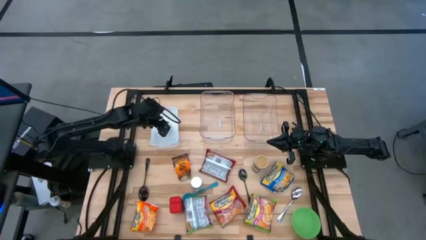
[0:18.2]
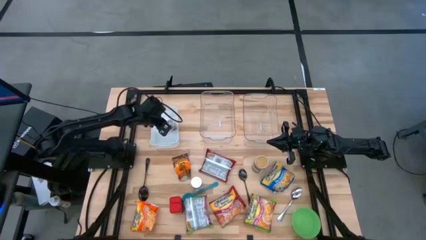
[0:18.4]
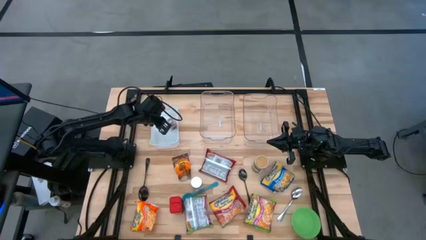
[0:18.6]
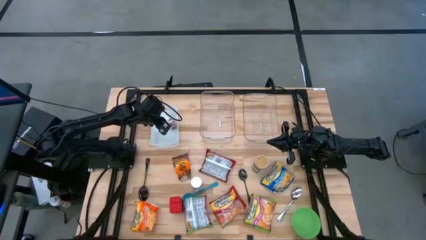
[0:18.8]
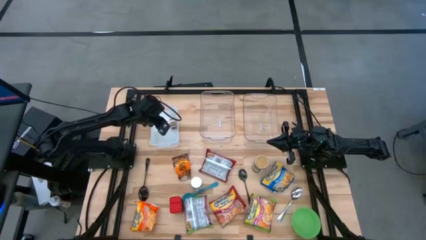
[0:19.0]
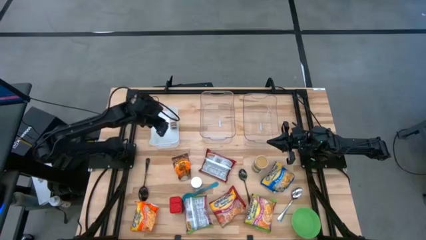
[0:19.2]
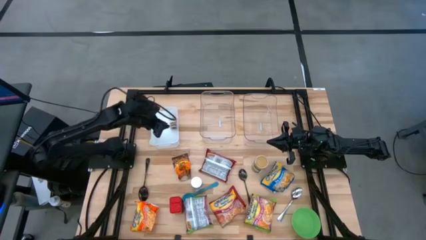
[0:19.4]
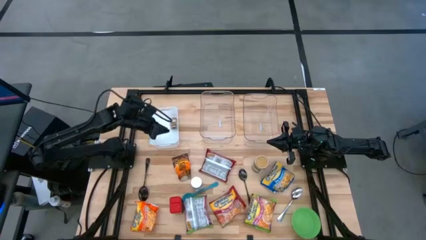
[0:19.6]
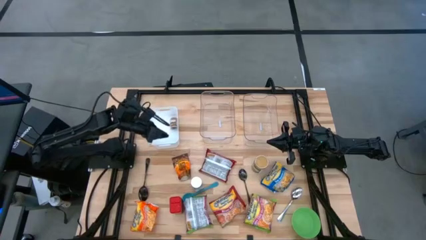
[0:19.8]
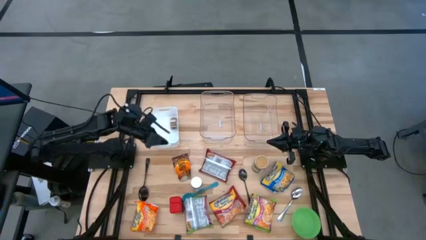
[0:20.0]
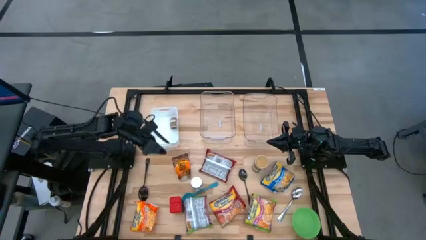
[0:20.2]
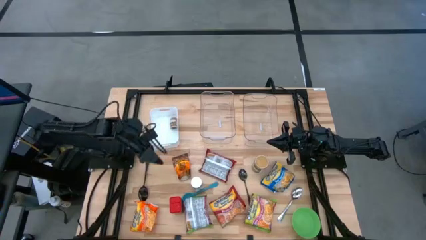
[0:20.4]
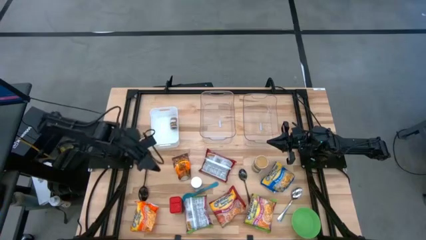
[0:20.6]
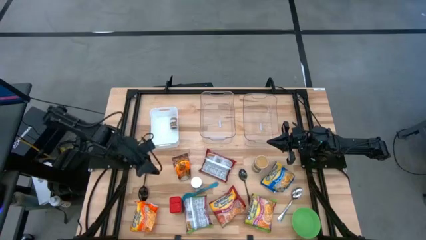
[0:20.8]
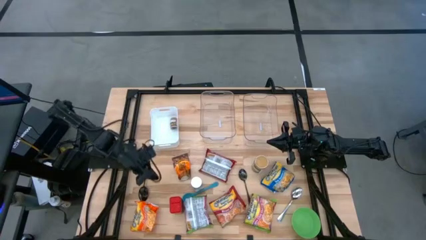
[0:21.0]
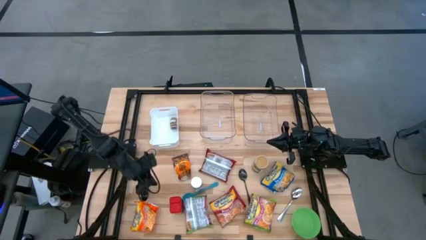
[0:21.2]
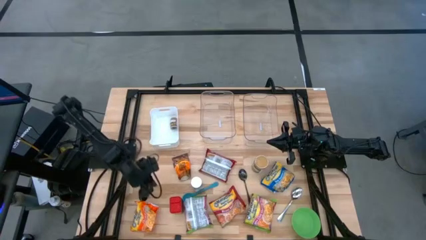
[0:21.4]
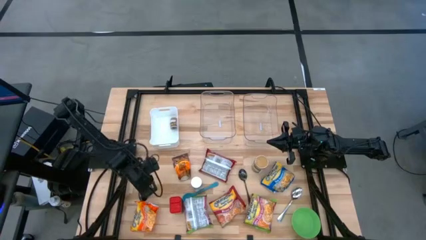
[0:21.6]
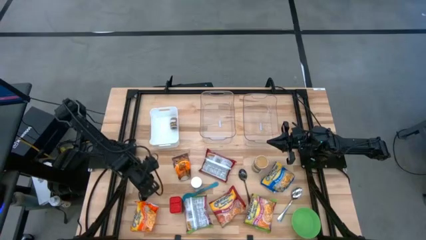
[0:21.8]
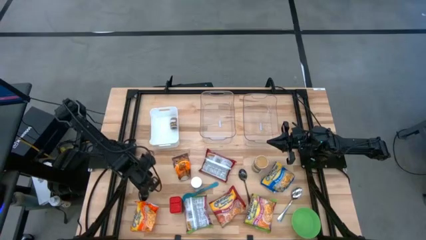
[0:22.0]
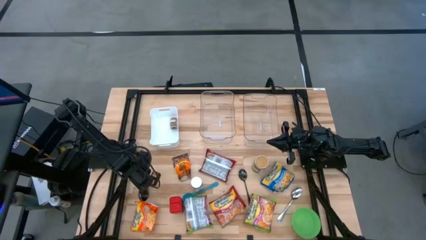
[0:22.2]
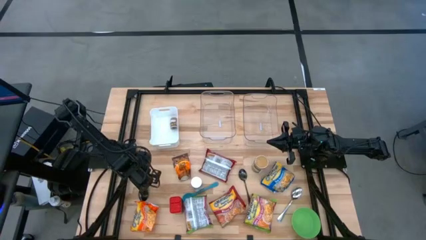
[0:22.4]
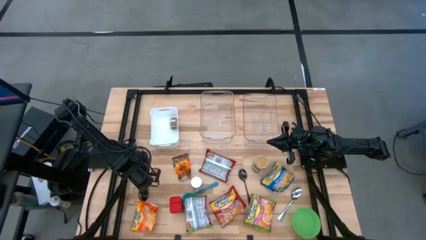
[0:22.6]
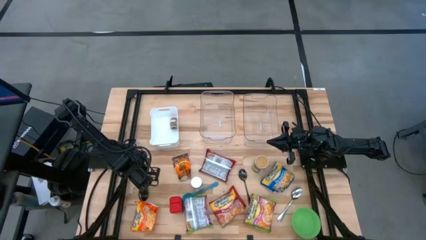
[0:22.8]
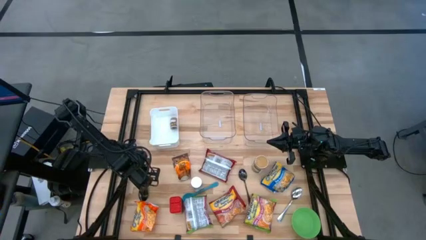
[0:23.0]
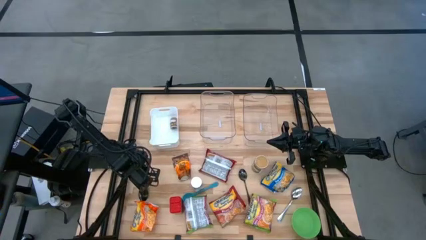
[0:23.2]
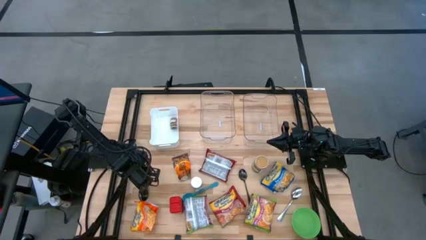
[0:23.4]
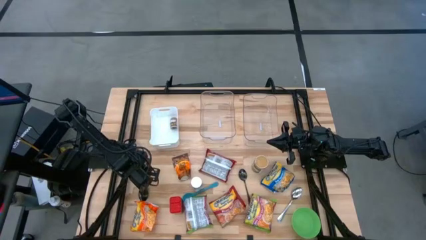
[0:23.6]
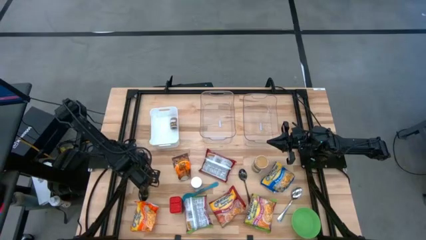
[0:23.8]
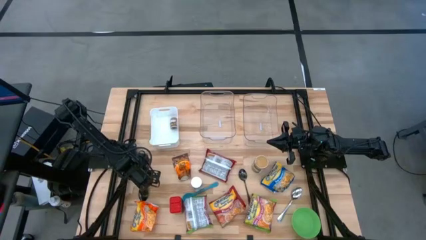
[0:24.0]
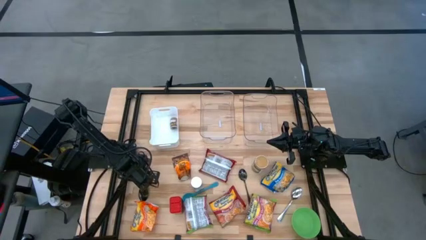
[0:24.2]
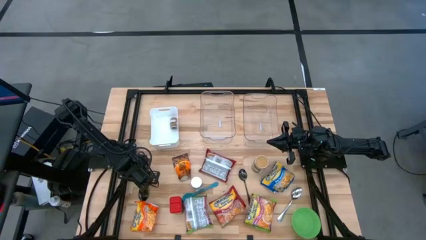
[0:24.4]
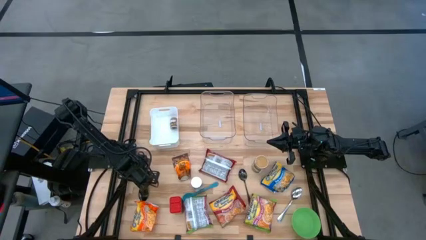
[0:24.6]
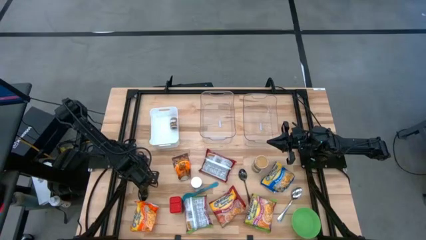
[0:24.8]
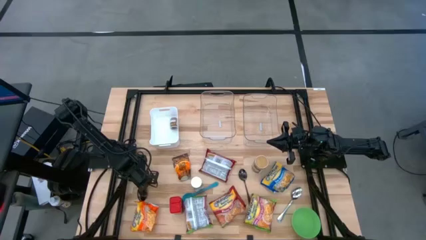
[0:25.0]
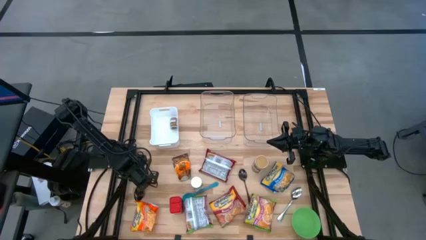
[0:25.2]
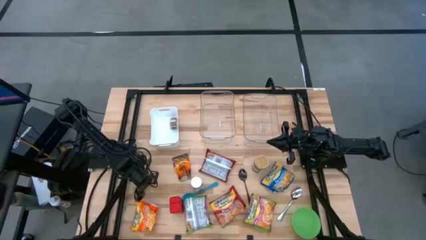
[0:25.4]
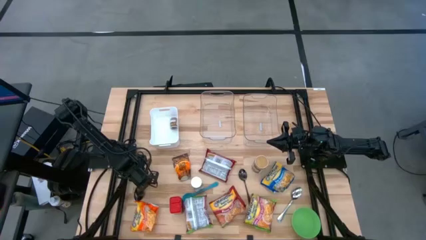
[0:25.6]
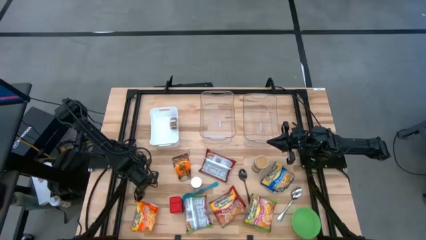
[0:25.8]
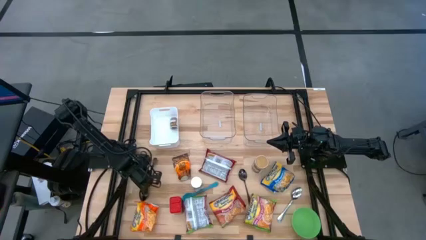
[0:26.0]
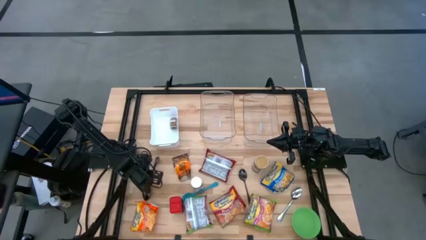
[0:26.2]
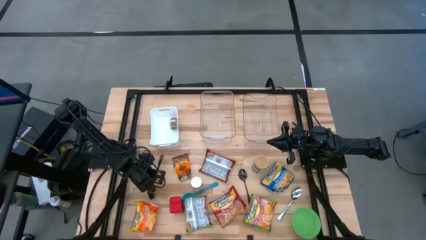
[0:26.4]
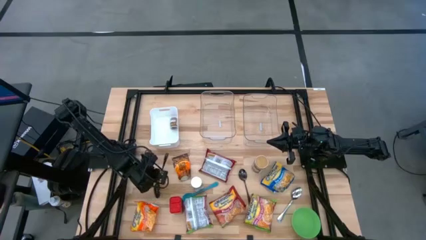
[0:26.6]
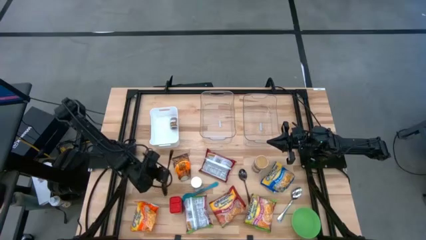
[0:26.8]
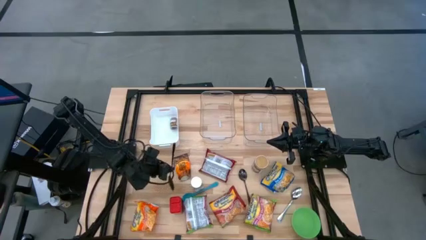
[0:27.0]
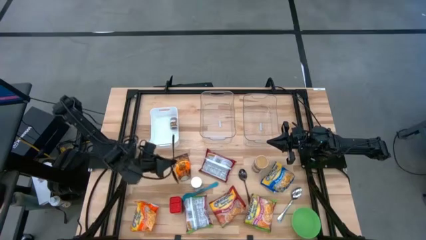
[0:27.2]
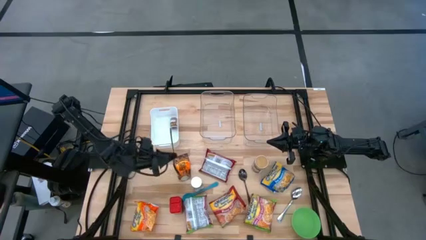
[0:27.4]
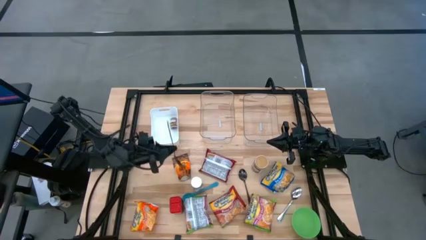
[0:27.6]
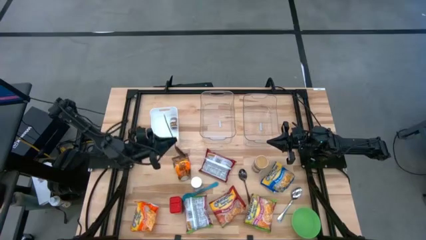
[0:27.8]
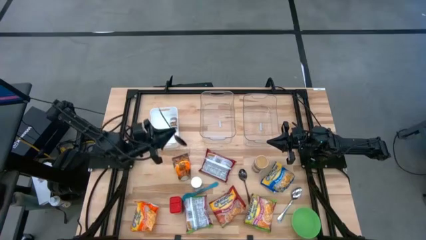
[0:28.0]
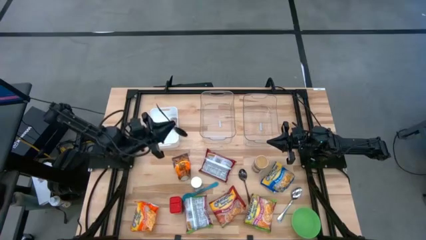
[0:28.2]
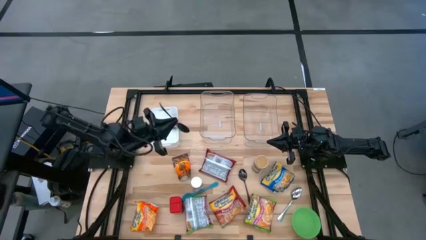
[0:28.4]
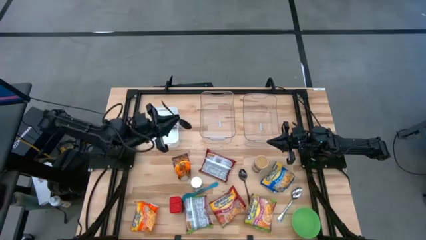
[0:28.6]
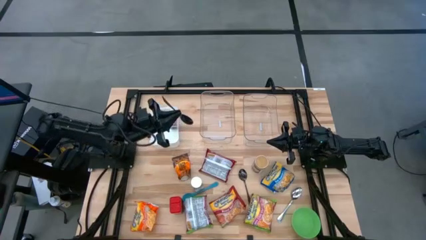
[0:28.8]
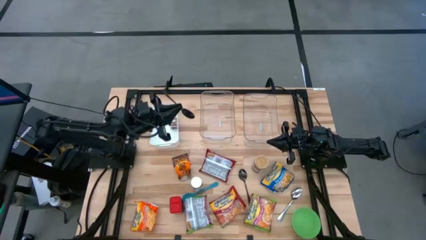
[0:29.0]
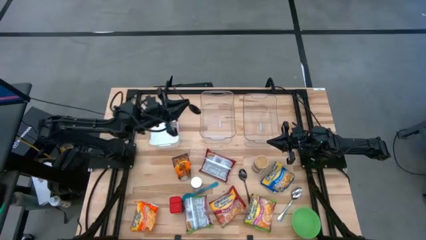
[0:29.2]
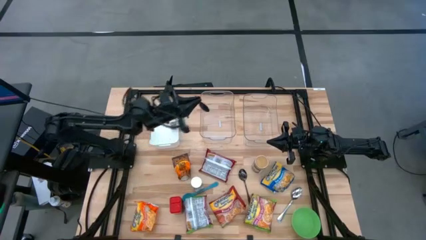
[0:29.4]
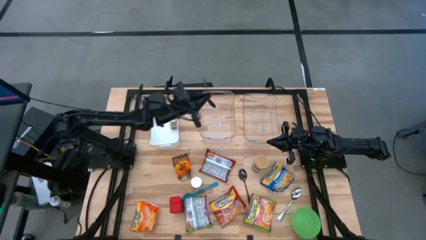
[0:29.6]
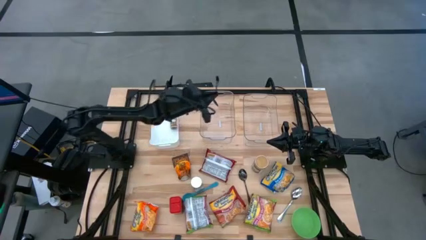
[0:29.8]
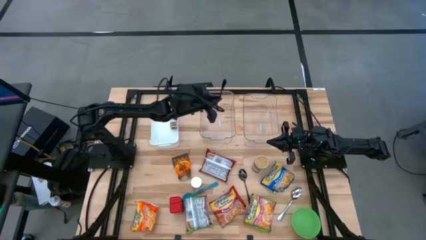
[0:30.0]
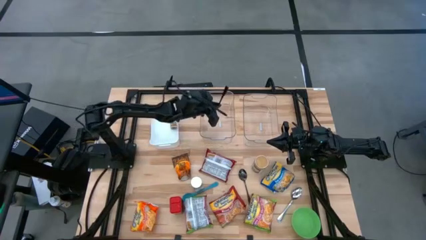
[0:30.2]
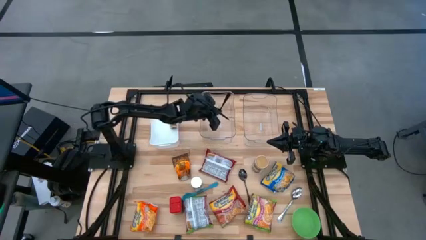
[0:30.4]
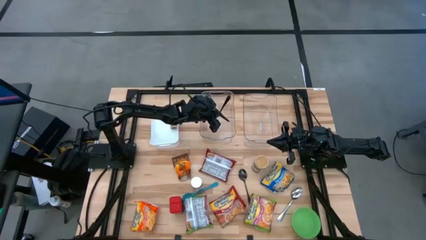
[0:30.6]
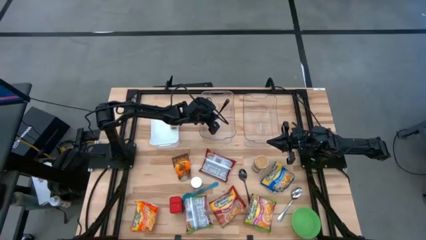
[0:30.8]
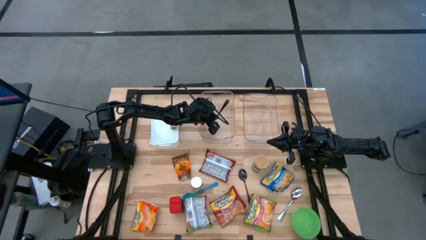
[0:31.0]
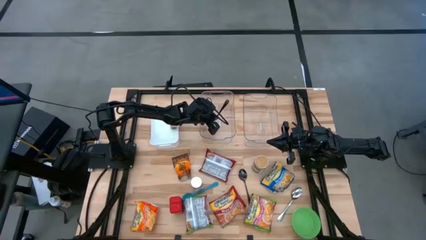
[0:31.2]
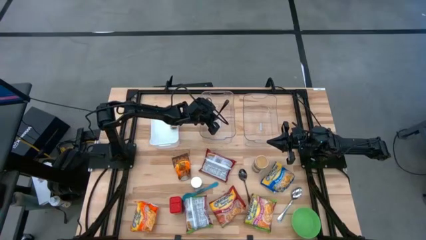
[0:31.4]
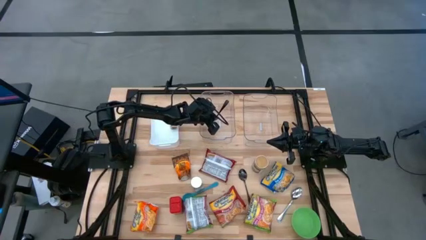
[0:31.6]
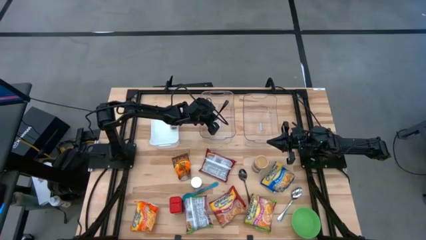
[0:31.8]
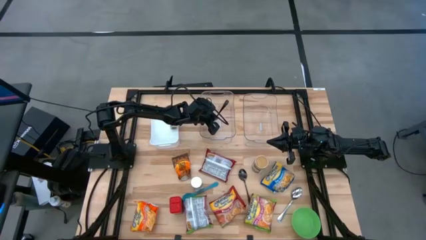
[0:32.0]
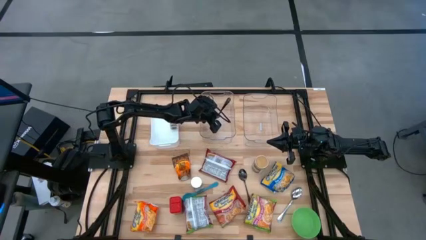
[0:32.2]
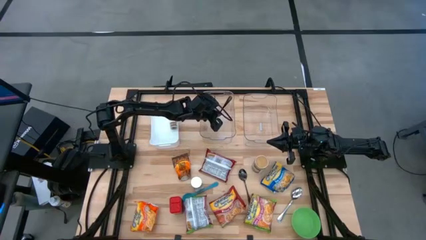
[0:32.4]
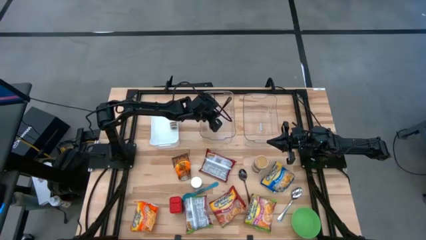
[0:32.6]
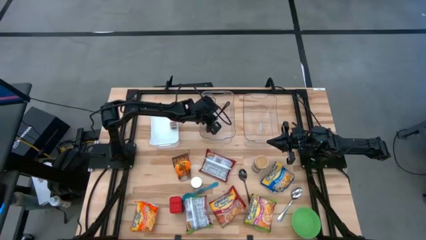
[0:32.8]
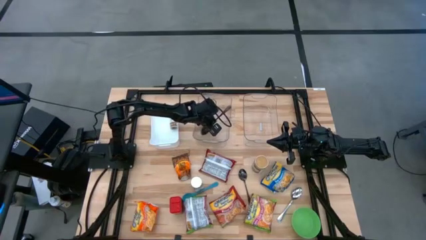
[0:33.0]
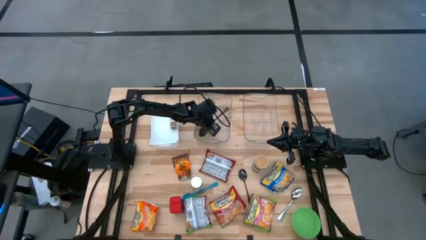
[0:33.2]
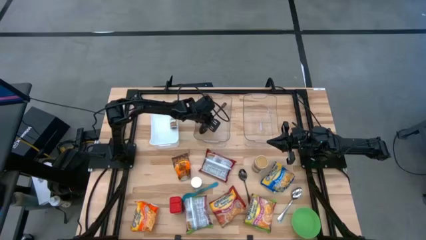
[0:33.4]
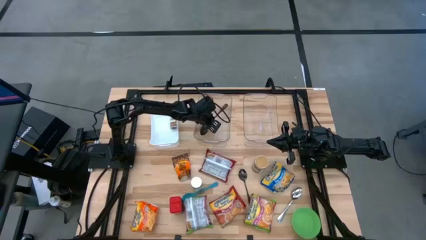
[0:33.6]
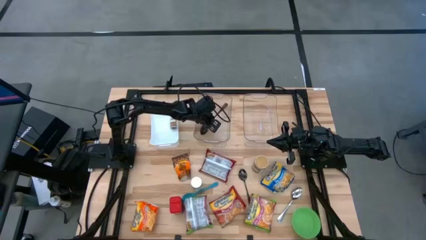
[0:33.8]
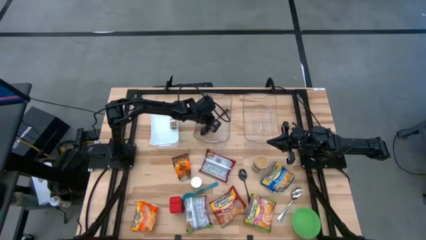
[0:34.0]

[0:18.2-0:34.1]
Task: Pick & Place Food Item
Put the left black spoon into the left transparent bin
